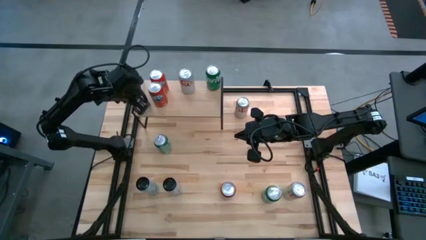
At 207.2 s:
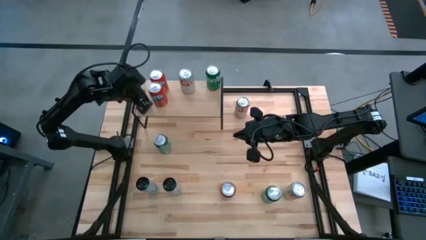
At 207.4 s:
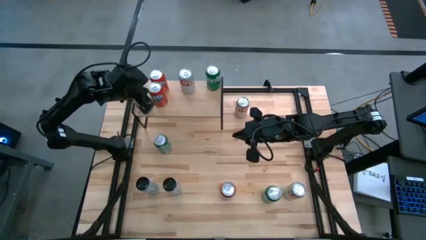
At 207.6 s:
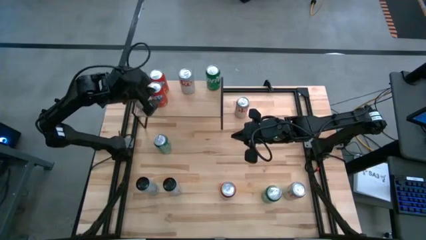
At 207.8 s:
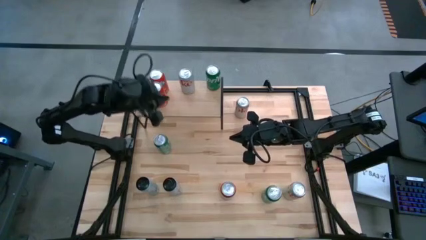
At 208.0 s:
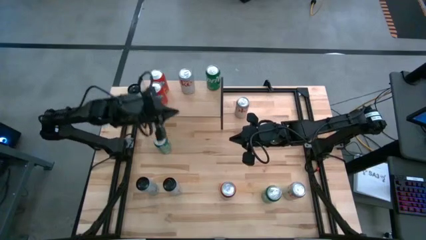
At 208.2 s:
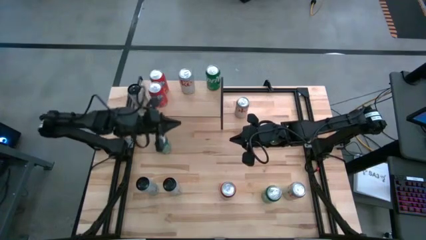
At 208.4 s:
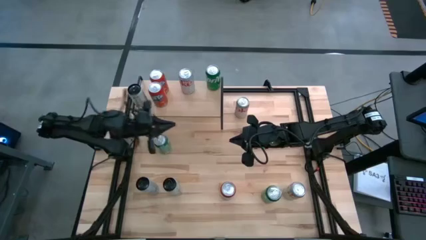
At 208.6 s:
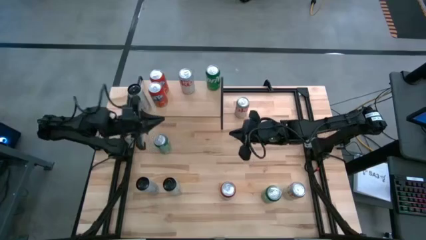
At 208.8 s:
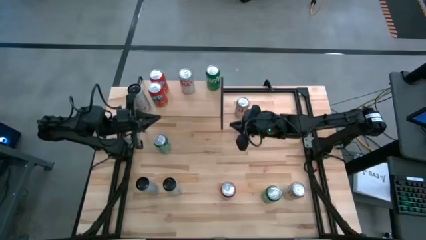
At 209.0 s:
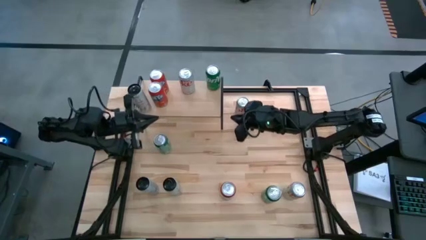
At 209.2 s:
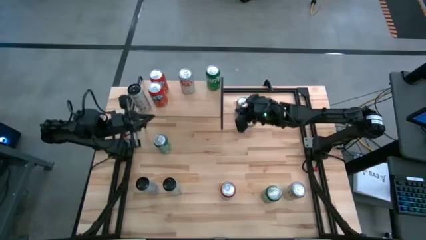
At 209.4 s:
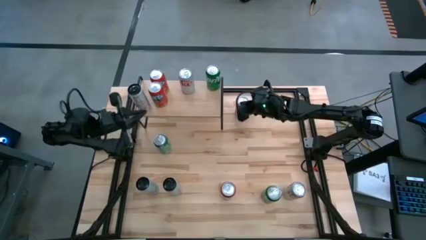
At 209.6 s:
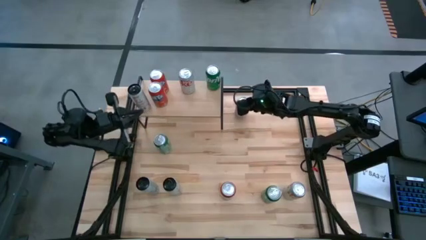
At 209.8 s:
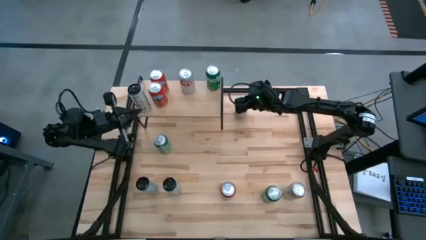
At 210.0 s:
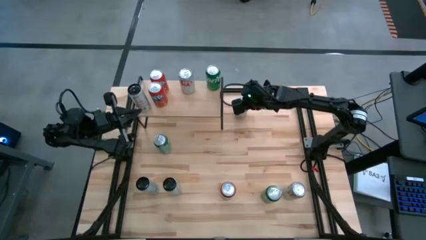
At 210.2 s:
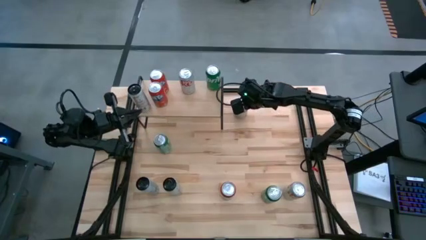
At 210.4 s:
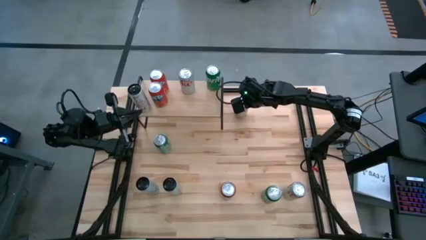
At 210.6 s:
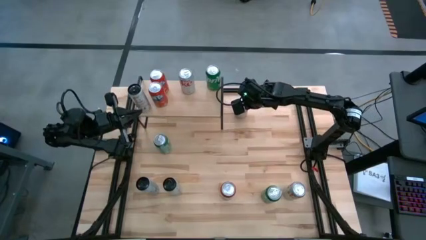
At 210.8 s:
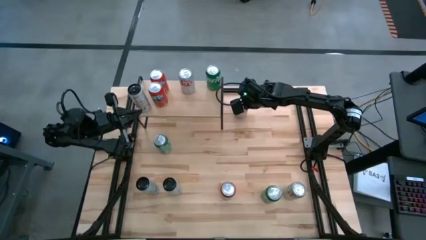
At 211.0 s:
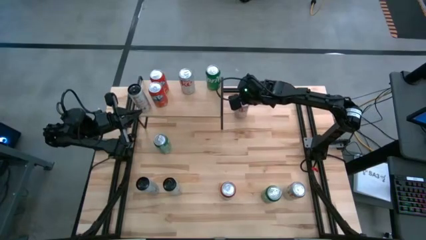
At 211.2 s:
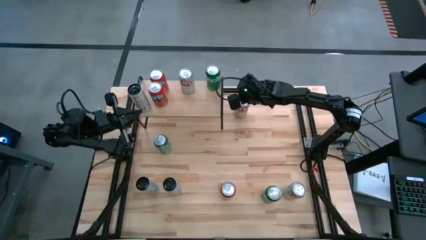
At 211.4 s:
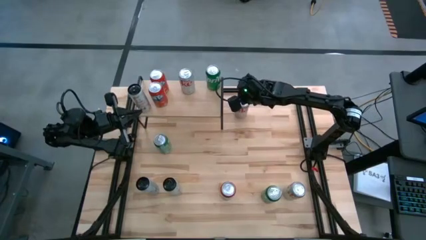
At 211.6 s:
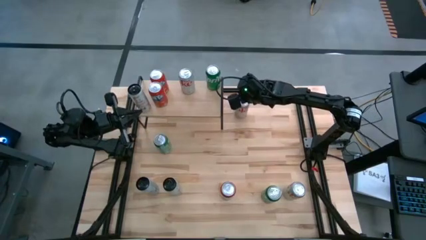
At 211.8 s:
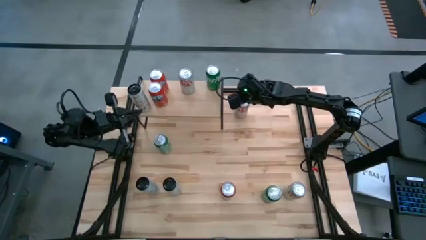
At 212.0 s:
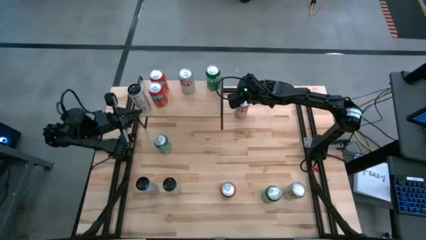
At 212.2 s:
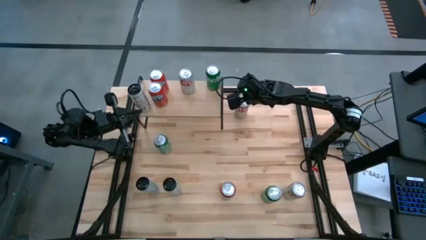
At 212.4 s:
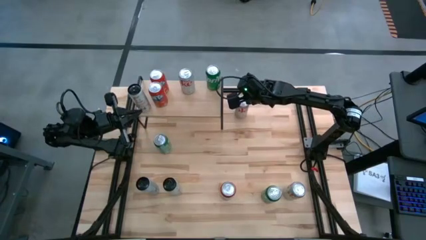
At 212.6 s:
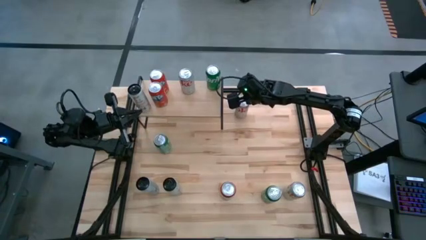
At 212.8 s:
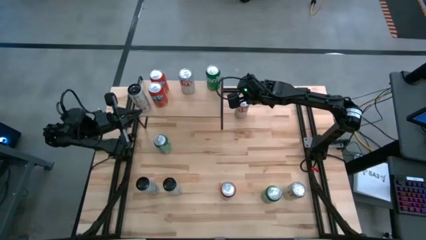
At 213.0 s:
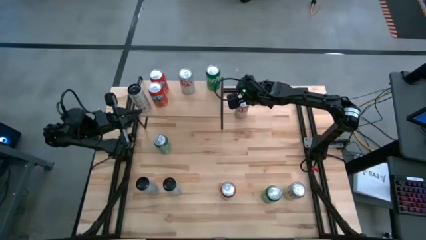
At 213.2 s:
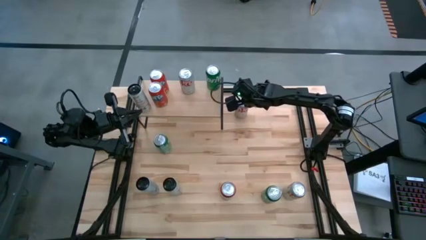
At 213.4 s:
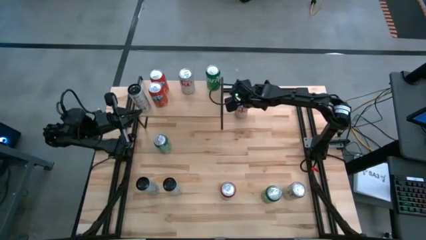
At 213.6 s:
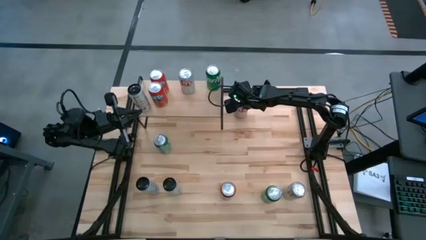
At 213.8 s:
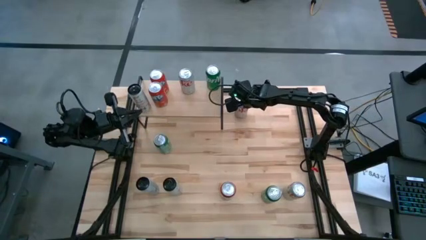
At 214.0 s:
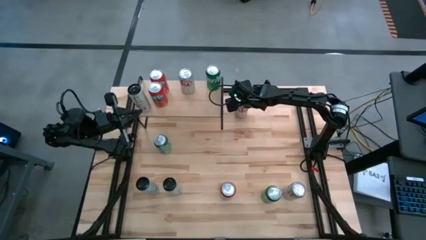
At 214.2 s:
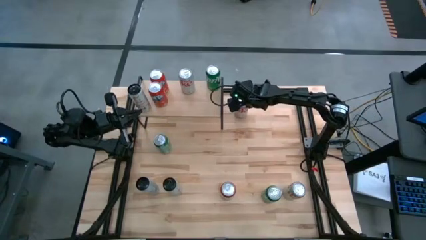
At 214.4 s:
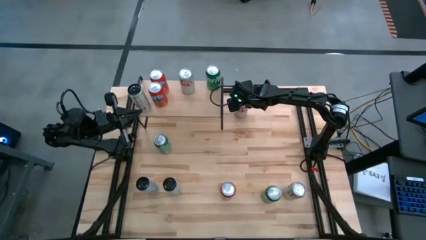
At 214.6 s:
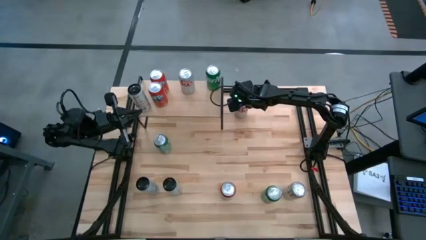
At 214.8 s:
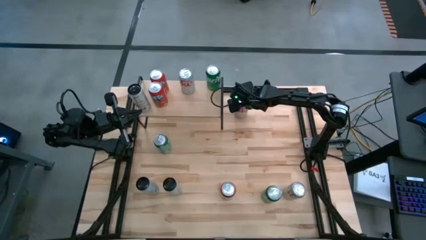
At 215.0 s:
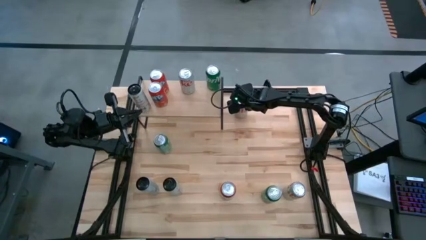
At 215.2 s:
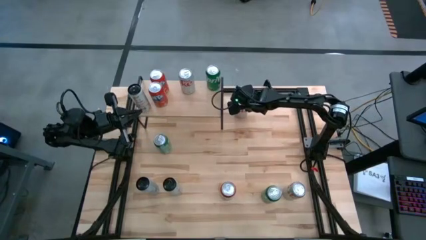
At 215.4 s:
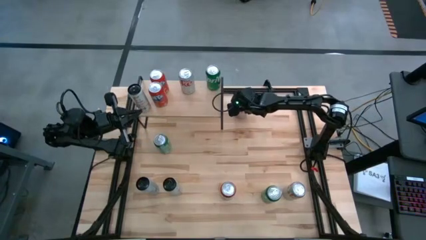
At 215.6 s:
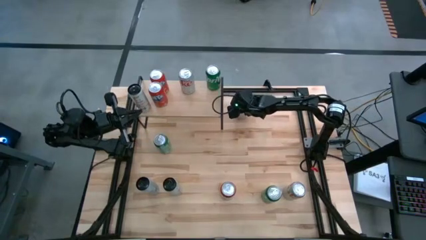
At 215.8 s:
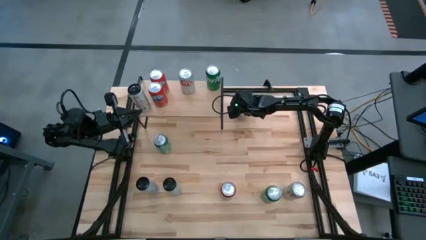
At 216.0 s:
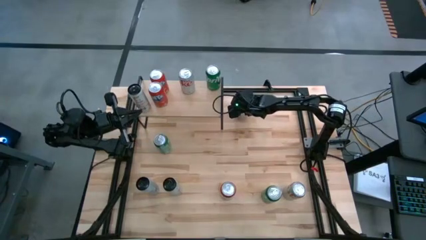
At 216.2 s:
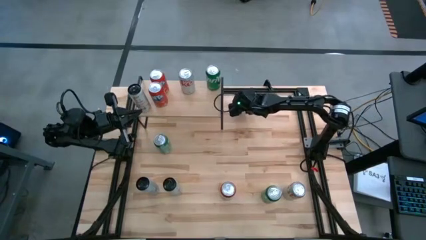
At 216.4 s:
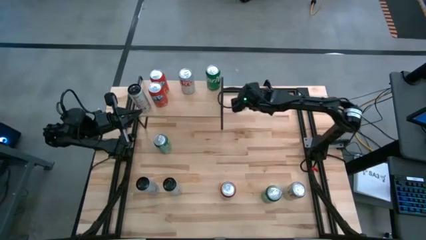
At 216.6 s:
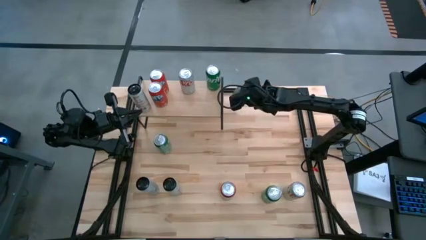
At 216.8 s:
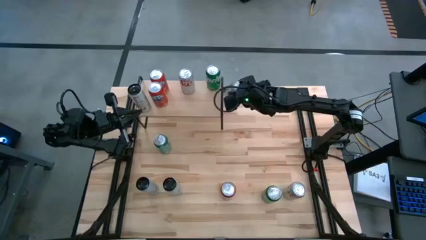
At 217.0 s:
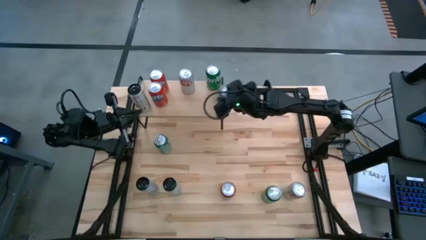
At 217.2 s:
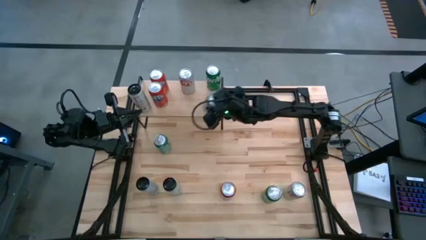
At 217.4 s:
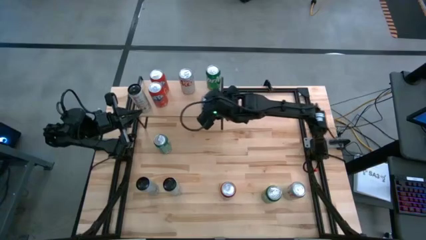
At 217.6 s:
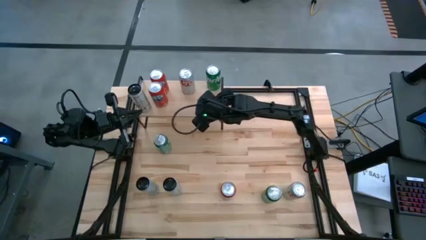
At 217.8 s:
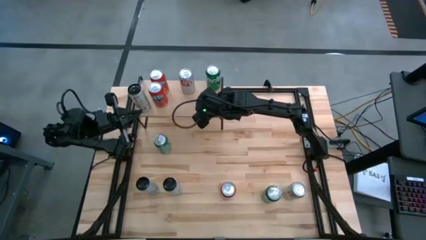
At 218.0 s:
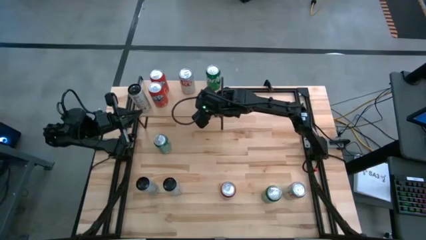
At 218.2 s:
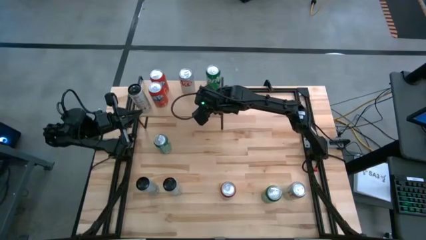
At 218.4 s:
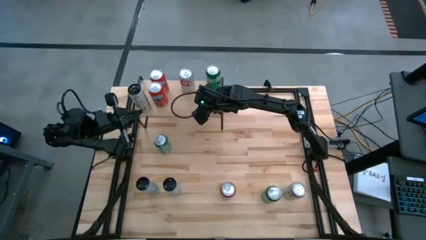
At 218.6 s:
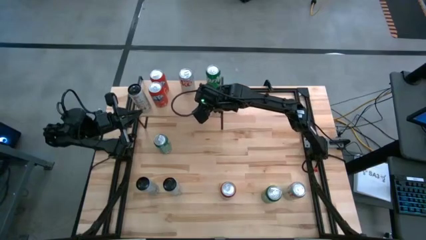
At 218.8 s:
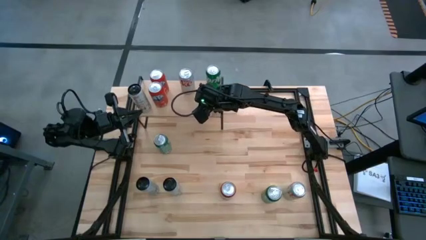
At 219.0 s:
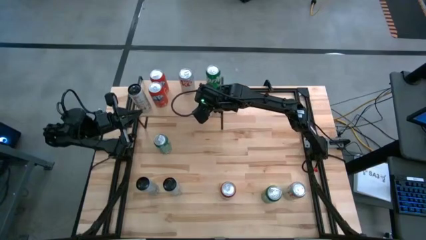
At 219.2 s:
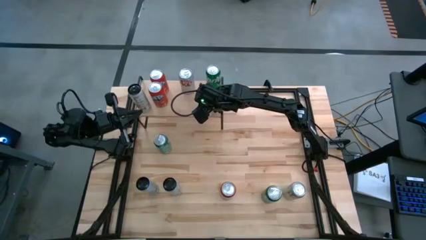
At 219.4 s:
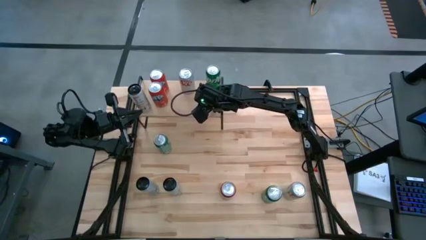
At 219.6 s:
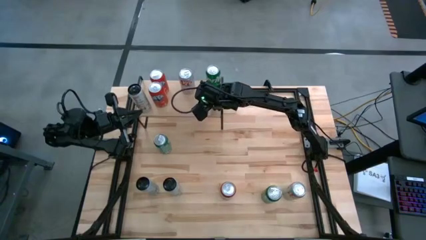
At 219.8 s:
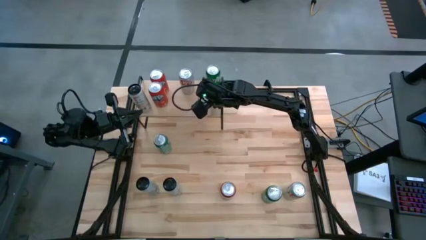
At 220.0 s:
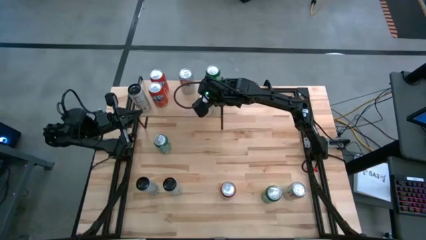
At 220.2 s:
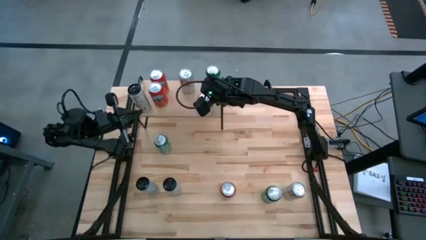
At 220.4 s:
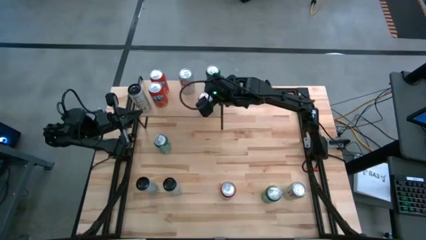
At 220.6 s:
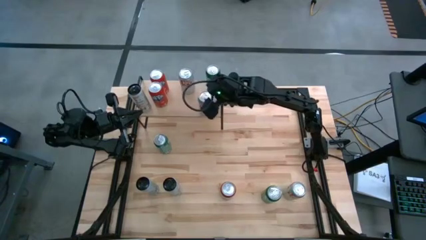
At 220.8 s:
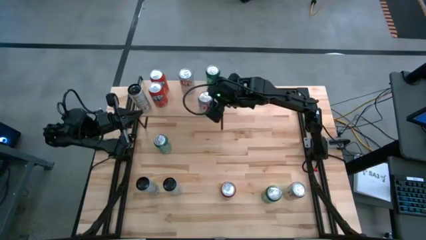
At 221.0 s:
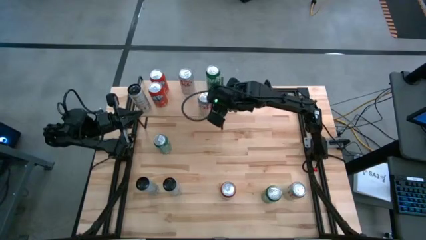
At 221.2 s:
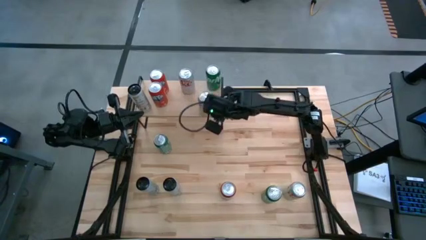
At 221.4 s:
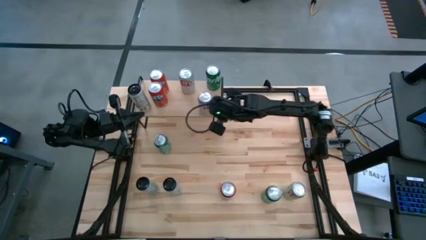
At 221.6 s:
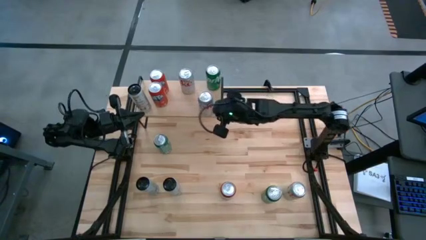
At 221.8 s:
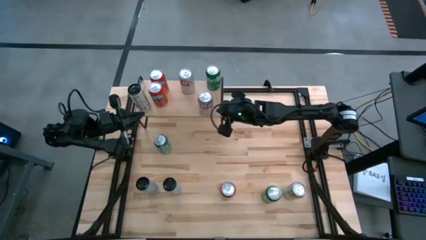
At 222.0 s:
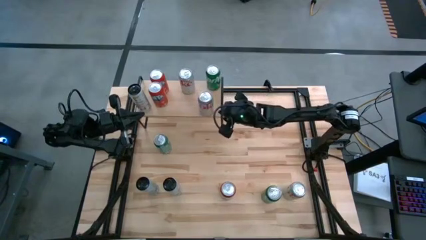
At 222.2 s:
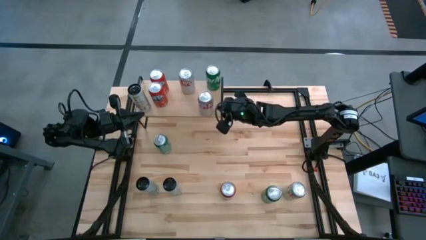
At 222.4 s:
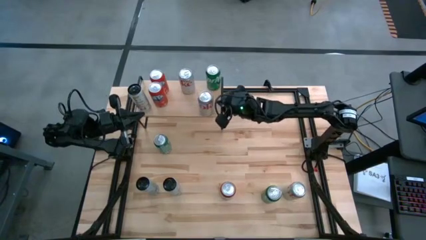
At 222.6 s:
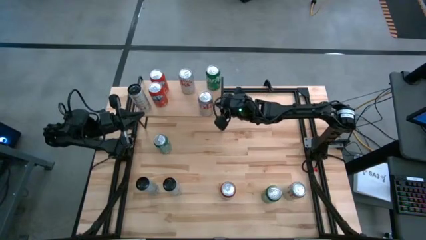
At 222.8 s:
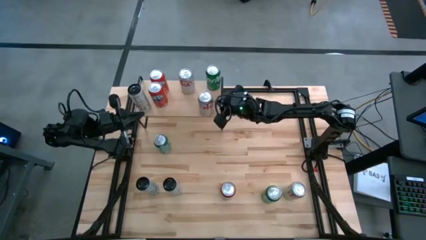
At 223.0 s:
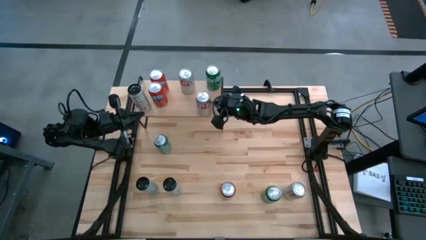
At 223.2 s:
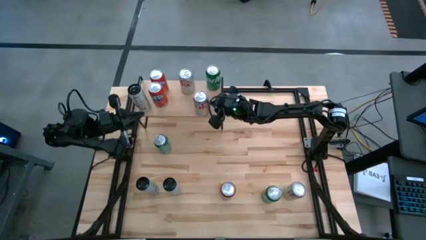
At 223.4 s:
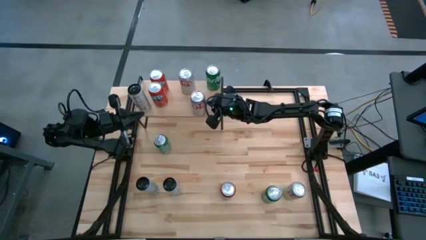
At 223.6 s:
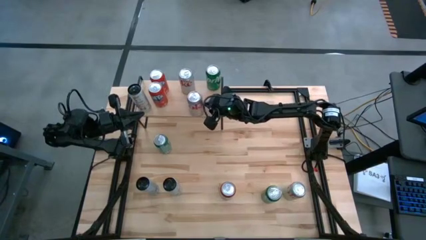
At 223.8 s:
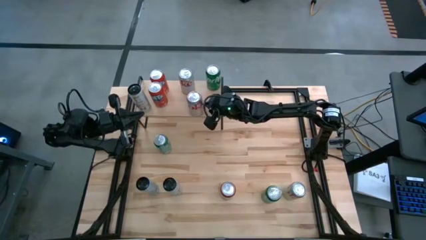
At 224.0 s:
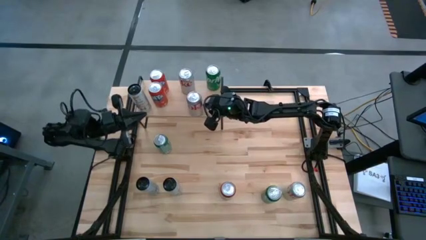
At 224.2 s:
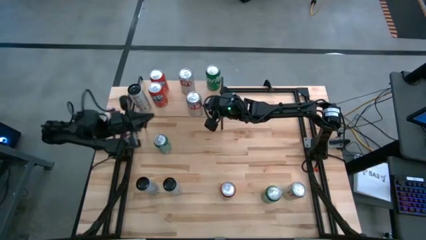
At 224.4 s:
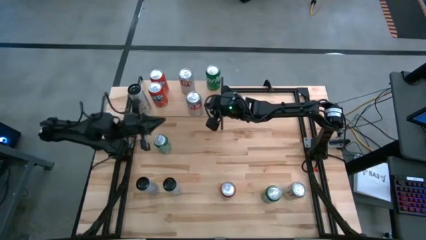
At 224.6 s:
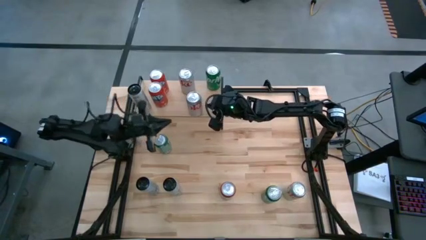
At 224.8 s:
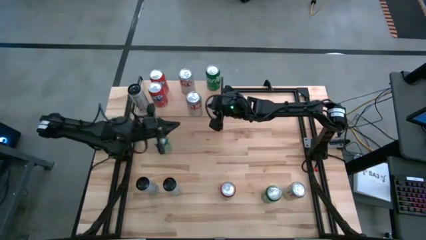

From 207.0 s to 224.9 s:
Task: Place canned beverage on shelf
Put the top silver soda can aligned with the other silver soda can on the shelf
